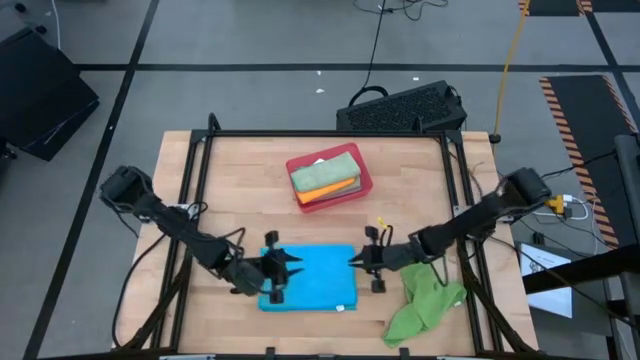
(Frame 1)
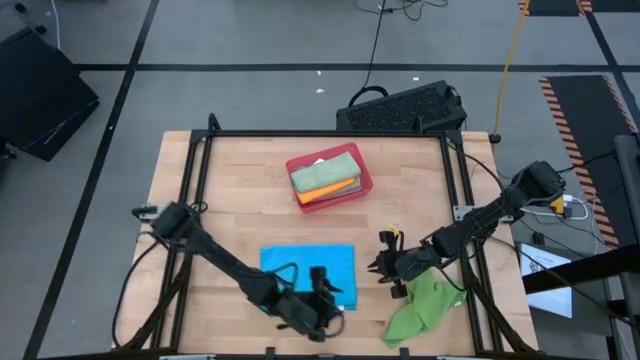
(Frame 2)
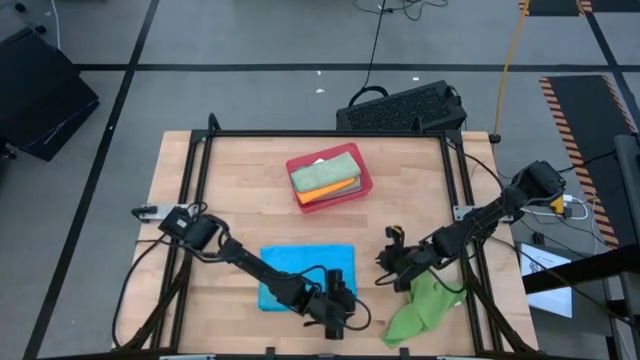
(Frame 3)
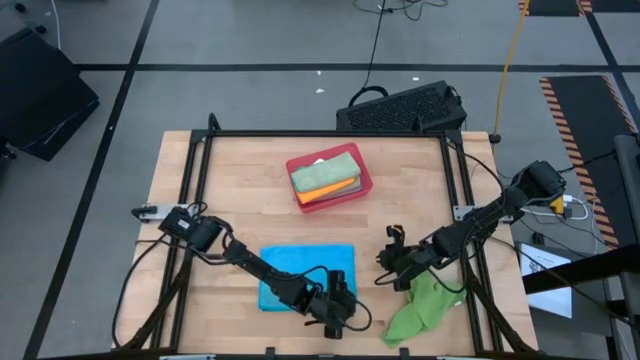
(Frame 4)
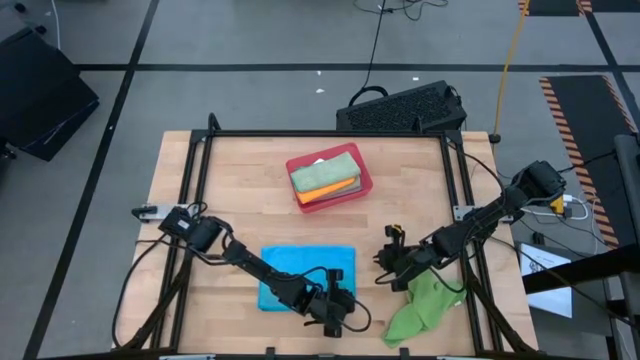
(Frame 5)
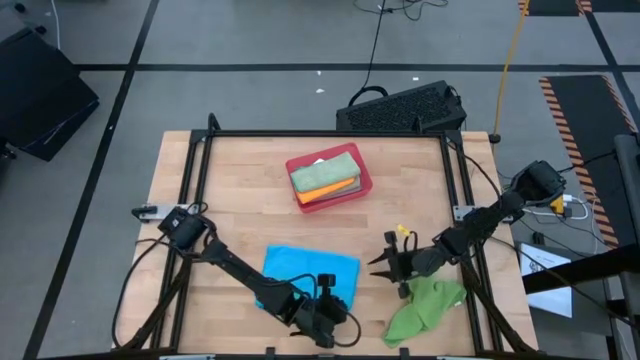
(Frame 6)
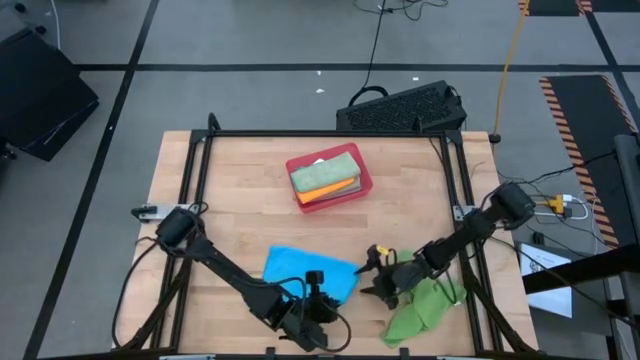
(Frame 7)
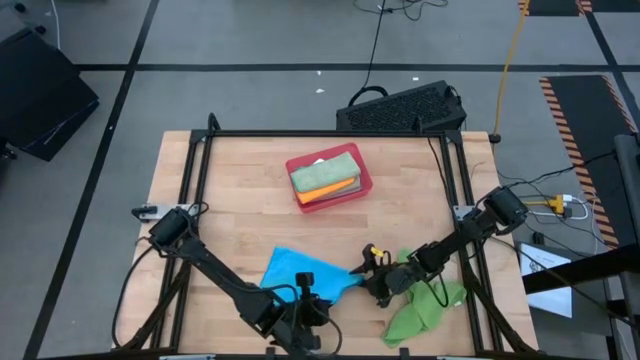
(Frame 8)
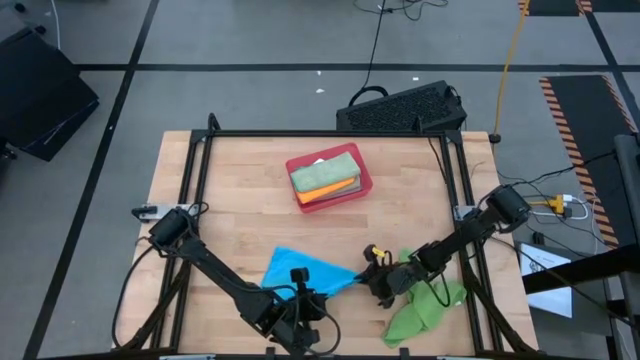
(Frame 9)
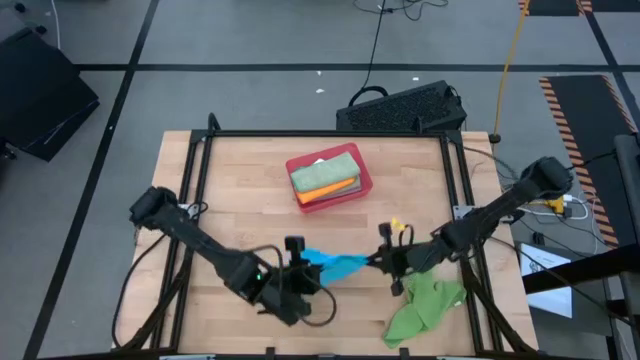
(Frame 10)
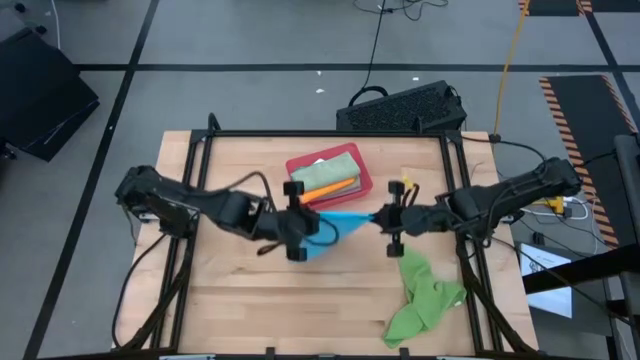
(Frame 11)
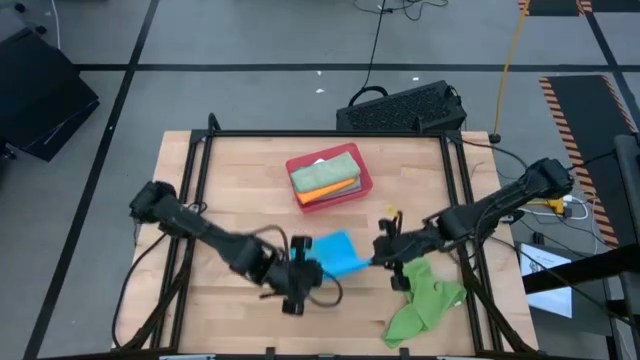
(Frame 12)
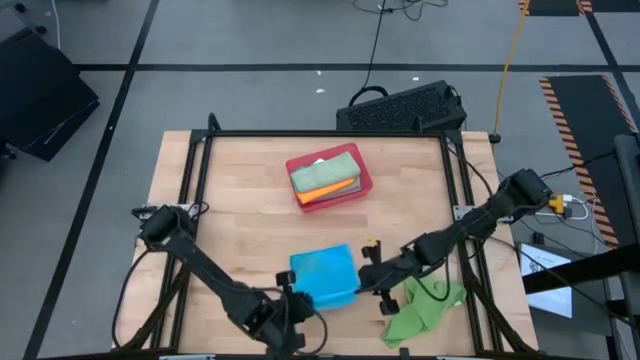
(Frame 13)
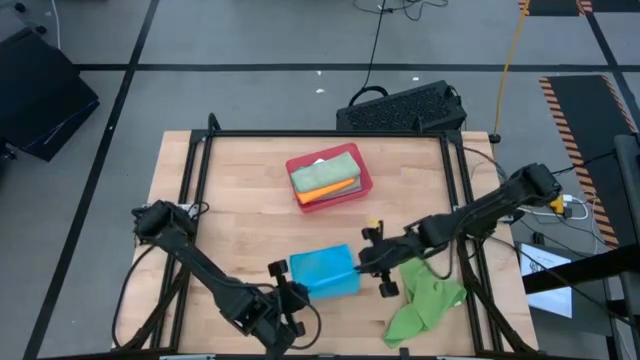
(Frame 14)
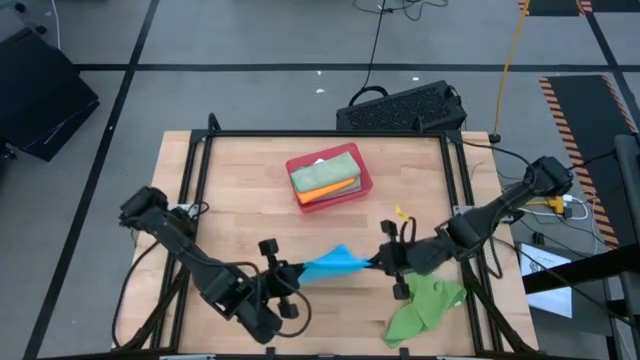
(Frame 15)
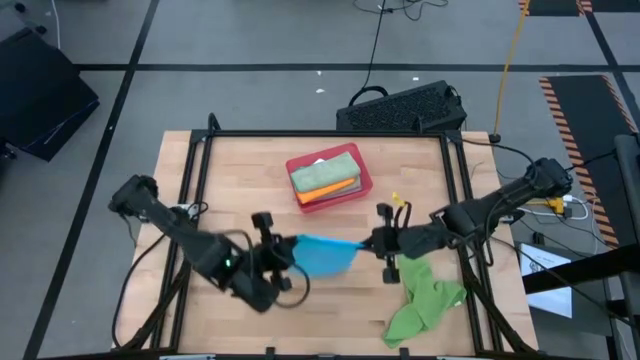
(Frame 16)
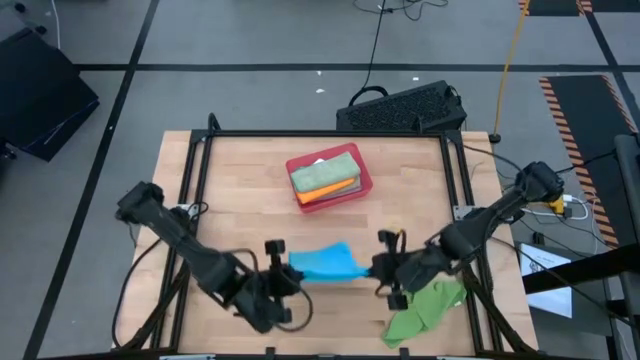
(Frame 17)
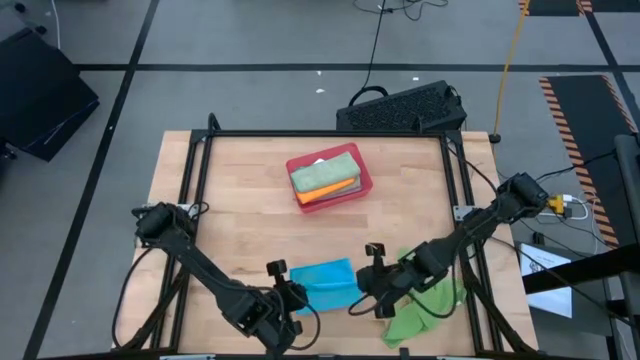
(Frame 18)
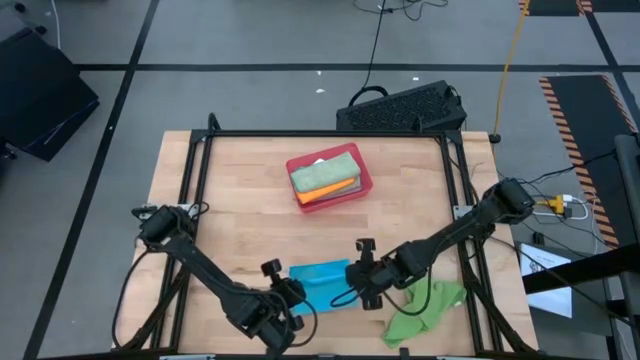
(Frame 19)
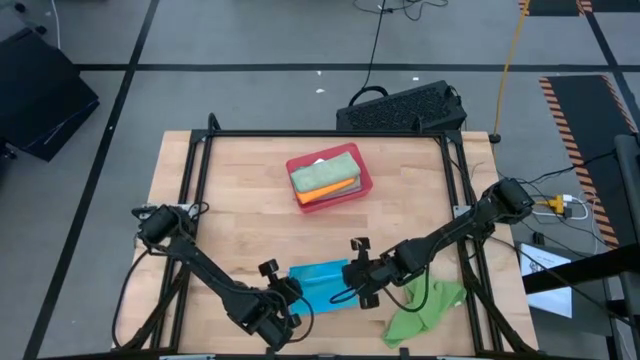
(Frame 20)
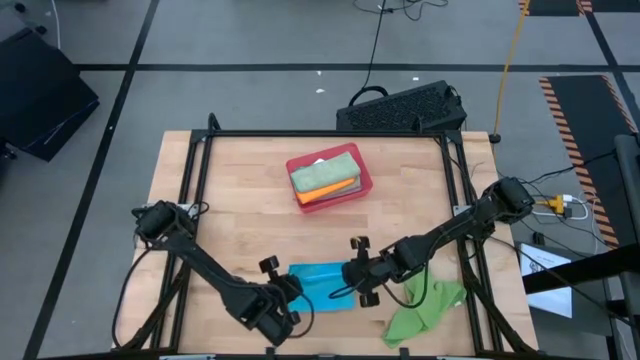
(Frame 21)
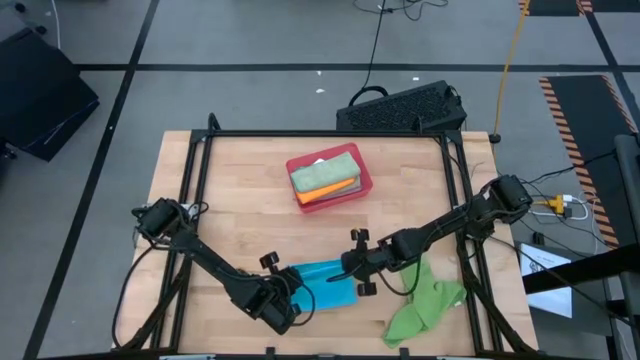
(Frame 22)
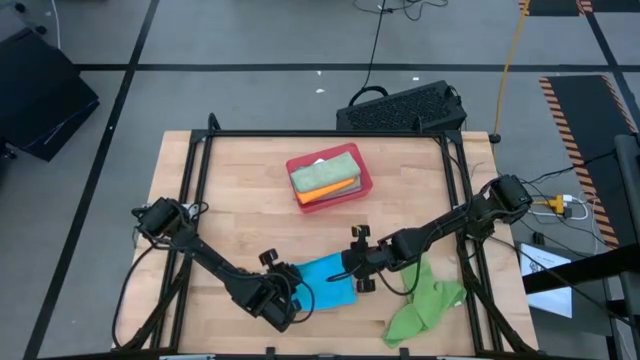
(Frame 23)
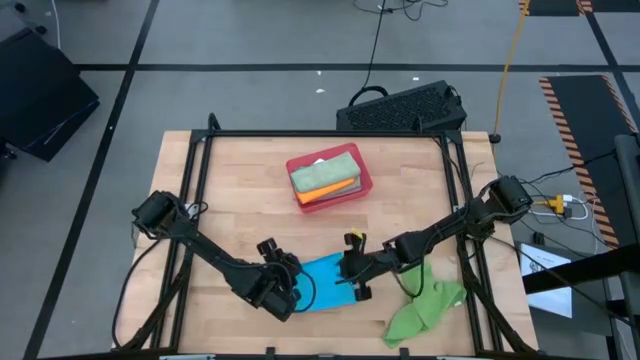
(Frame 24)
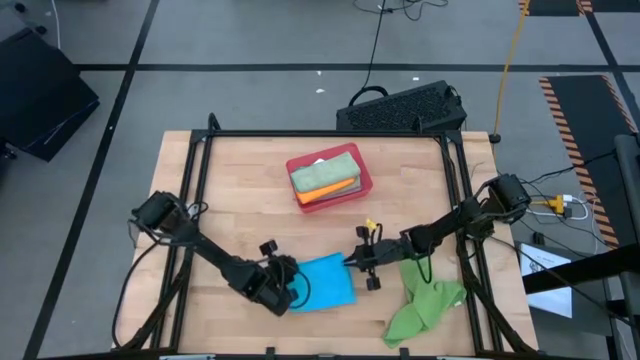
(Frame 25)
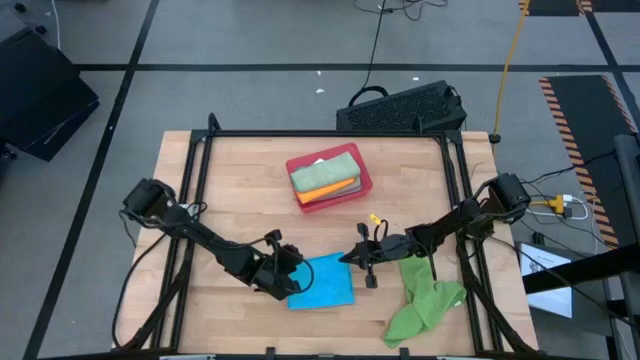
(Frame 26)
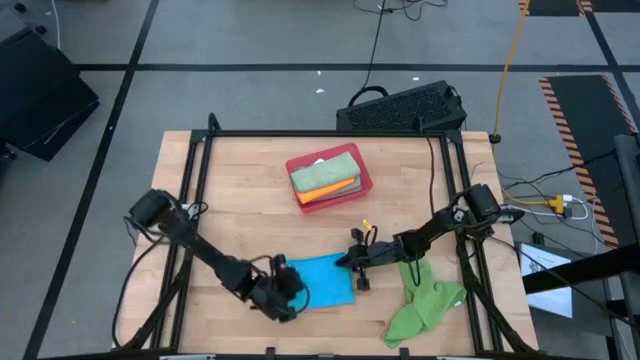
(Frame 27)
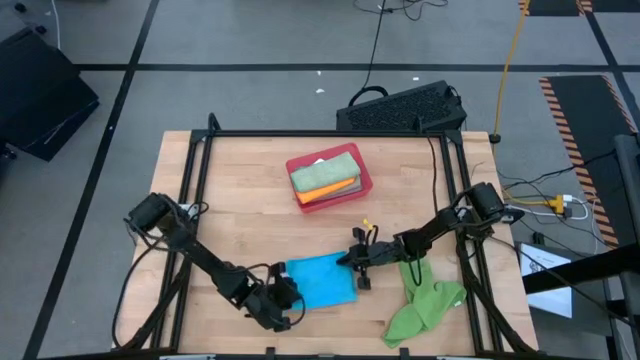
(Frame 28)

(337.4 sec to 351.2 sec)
Task: Fold microfiber towels
Fold the blue microfiber cloth
